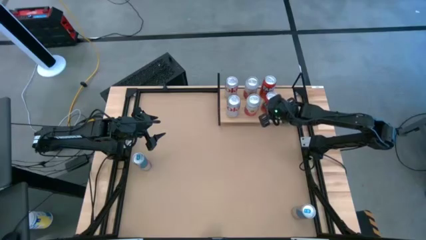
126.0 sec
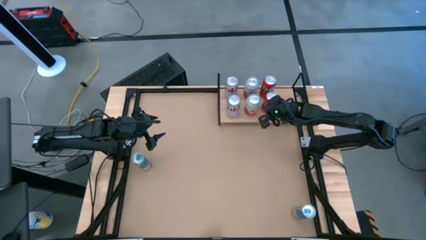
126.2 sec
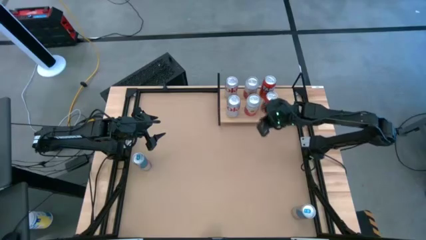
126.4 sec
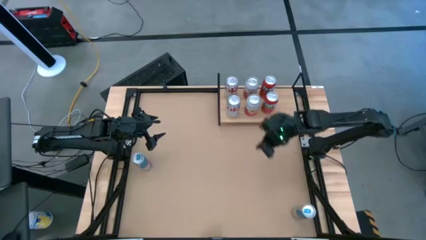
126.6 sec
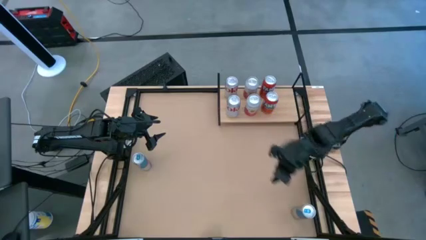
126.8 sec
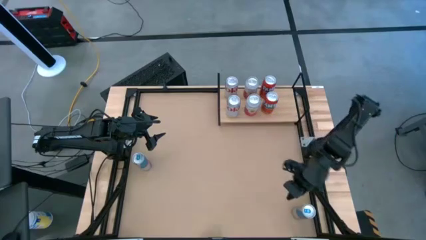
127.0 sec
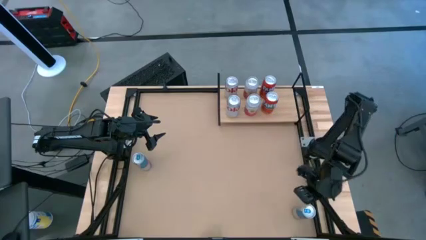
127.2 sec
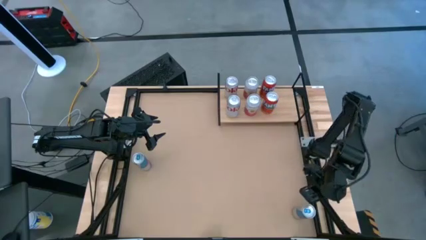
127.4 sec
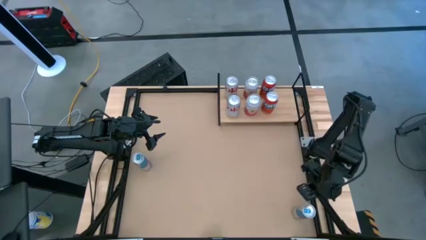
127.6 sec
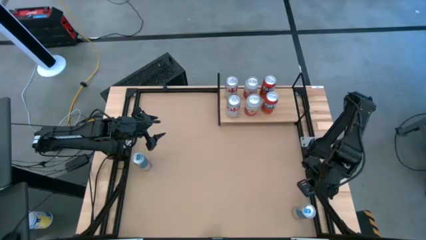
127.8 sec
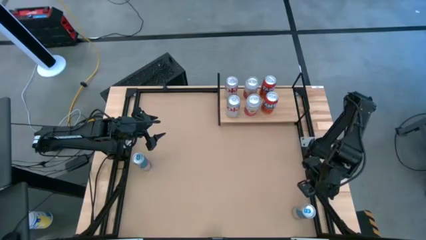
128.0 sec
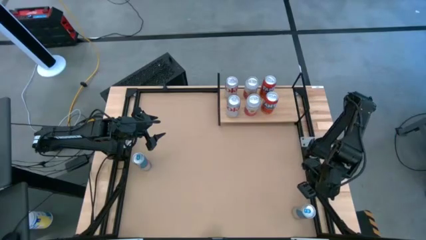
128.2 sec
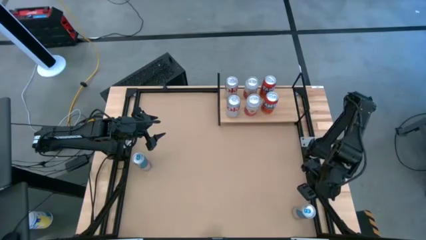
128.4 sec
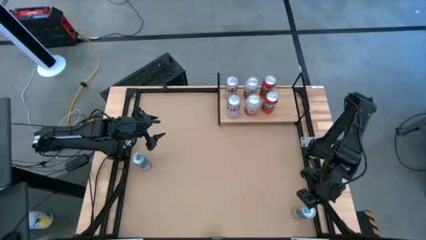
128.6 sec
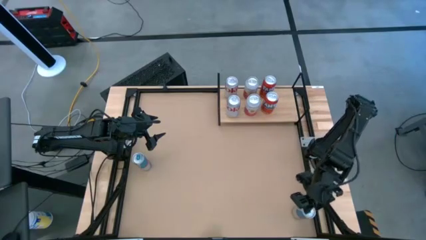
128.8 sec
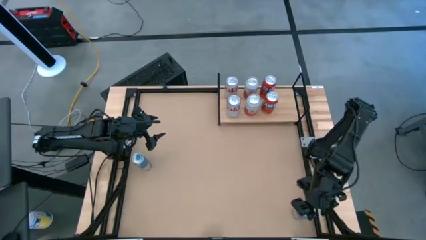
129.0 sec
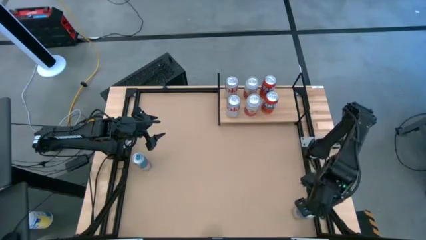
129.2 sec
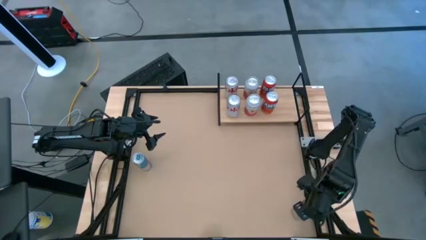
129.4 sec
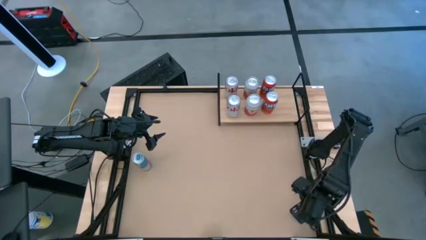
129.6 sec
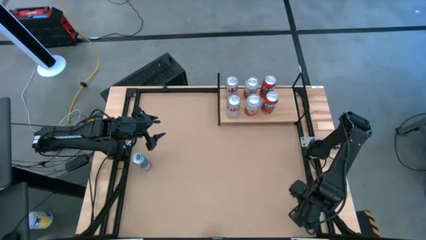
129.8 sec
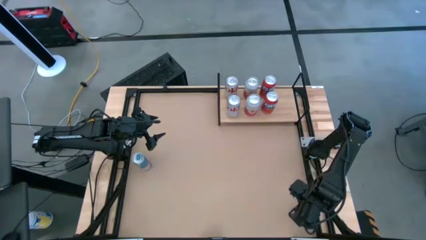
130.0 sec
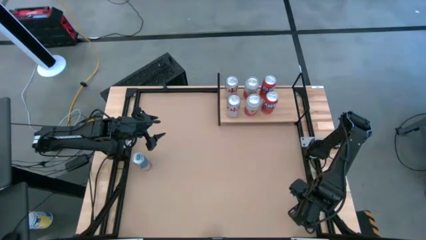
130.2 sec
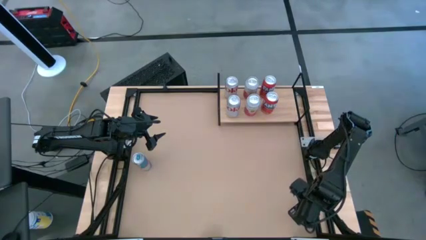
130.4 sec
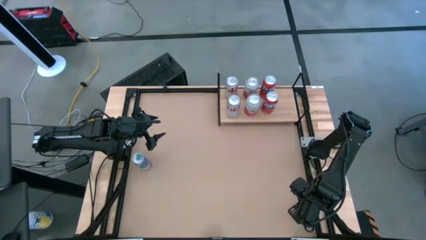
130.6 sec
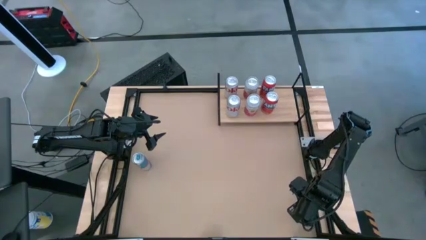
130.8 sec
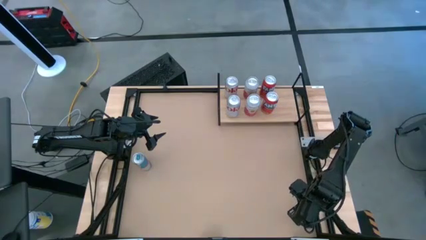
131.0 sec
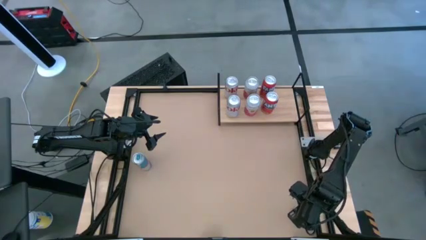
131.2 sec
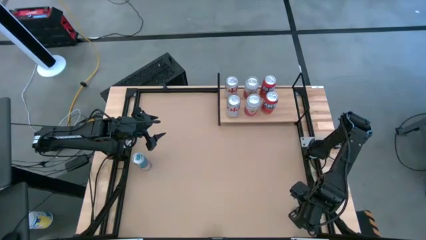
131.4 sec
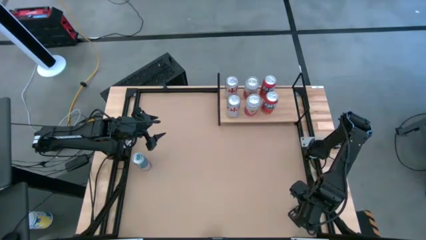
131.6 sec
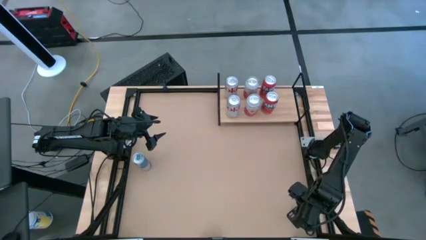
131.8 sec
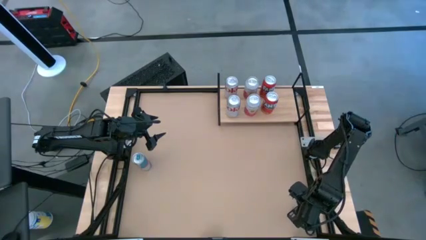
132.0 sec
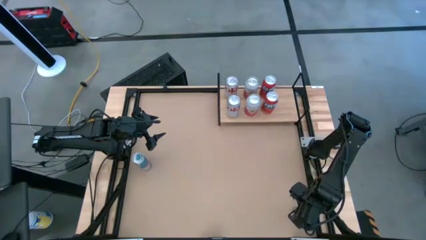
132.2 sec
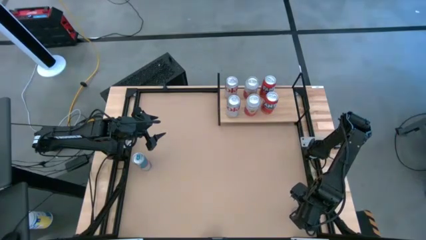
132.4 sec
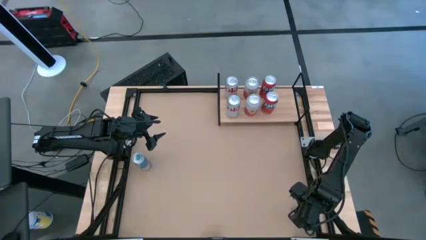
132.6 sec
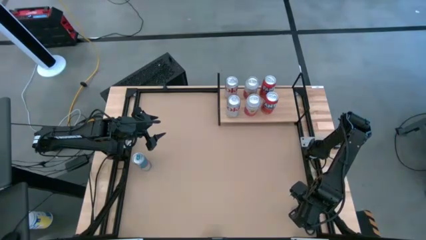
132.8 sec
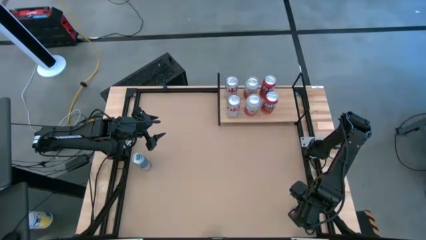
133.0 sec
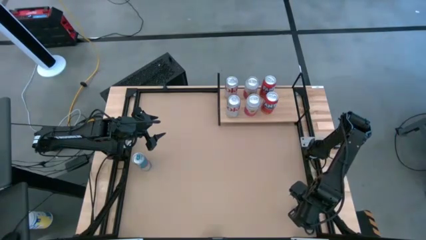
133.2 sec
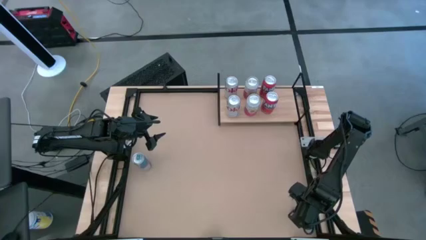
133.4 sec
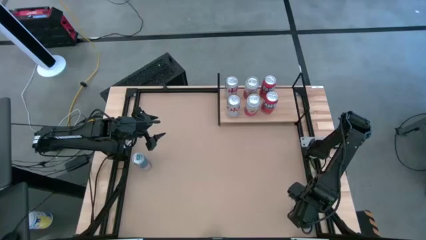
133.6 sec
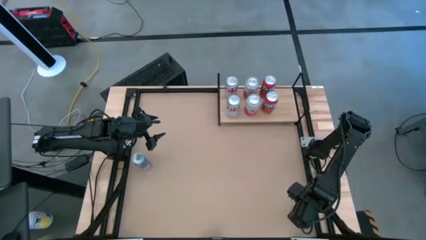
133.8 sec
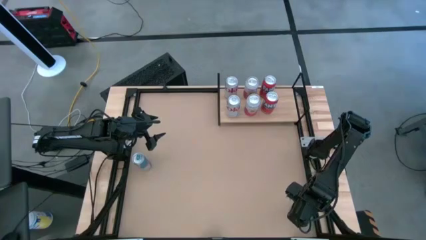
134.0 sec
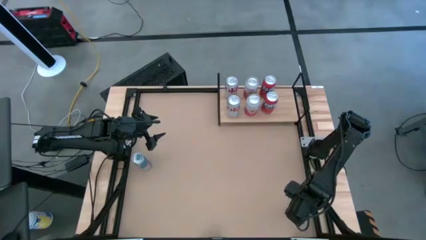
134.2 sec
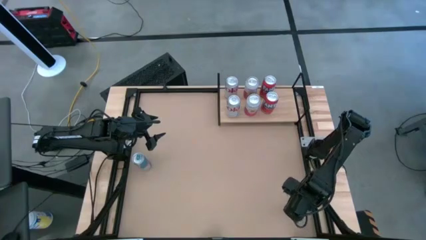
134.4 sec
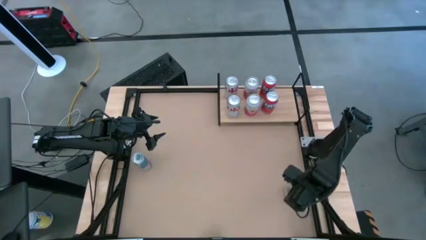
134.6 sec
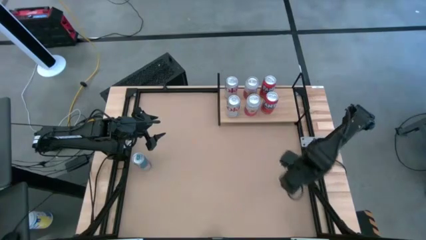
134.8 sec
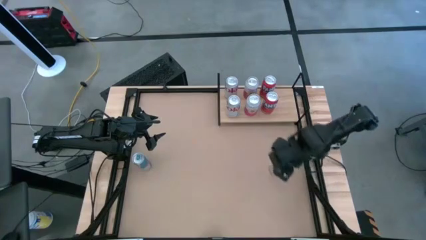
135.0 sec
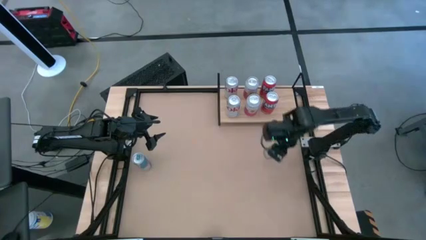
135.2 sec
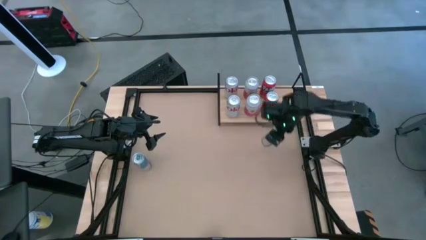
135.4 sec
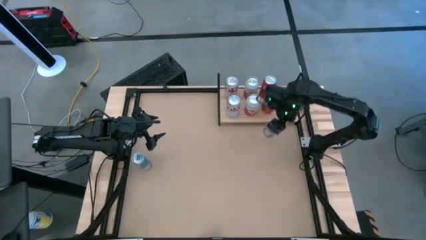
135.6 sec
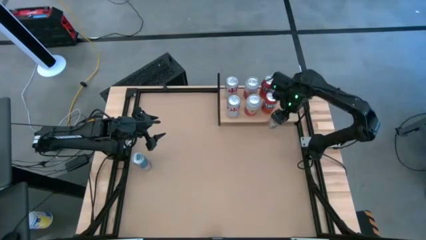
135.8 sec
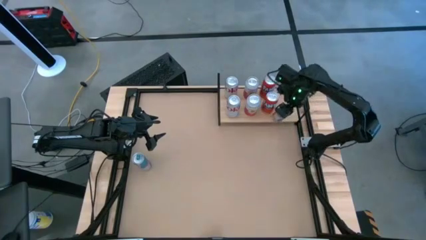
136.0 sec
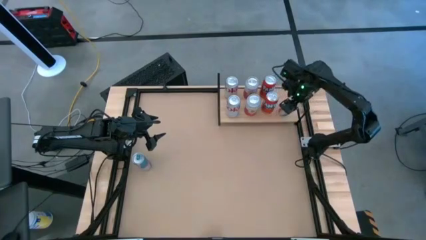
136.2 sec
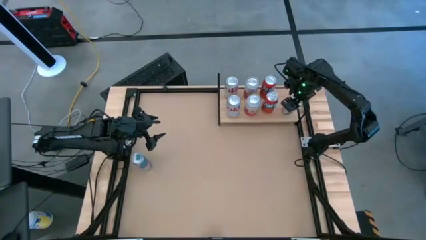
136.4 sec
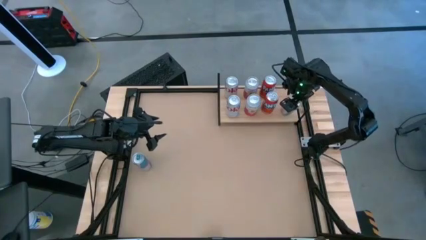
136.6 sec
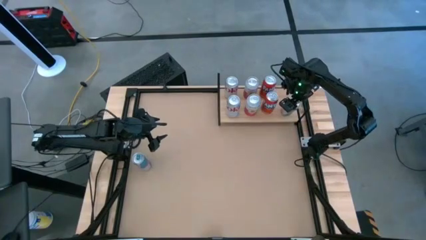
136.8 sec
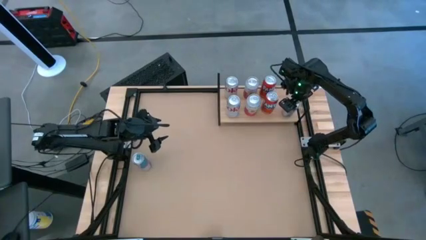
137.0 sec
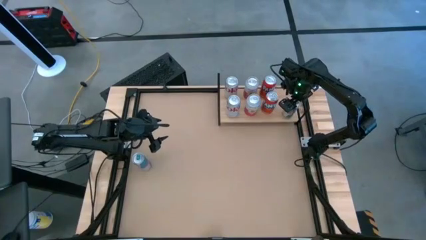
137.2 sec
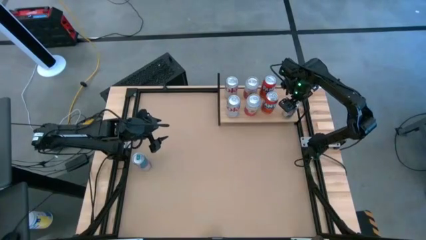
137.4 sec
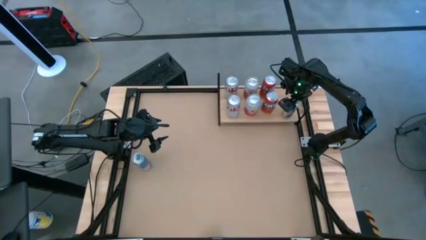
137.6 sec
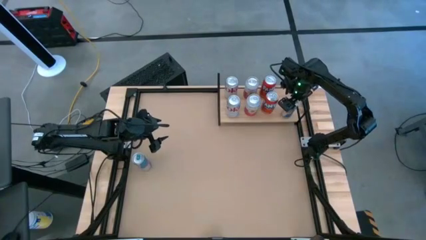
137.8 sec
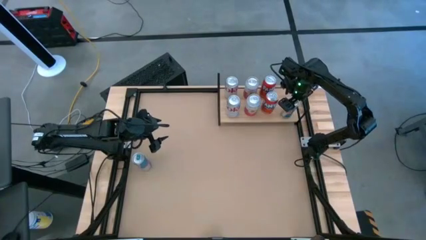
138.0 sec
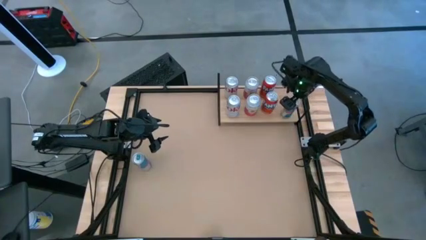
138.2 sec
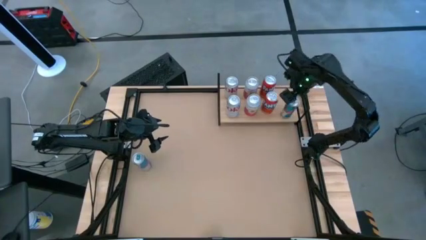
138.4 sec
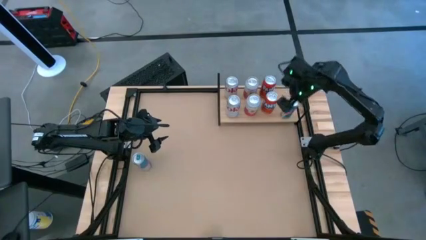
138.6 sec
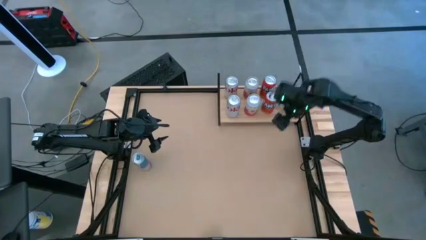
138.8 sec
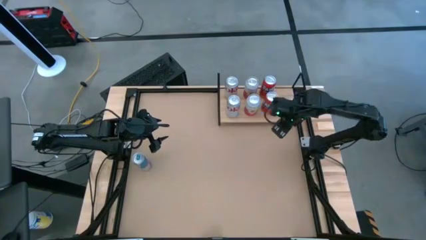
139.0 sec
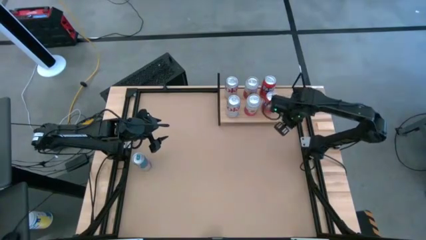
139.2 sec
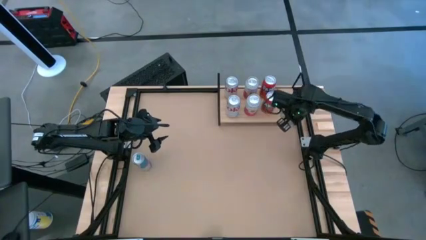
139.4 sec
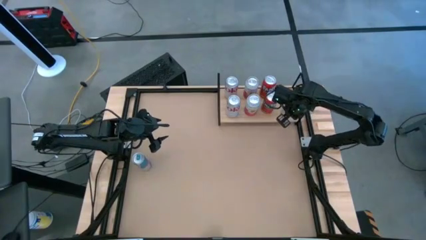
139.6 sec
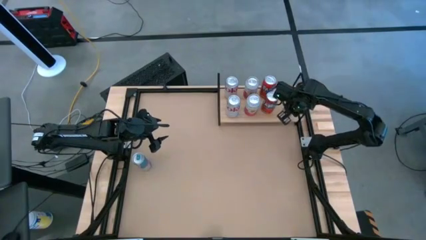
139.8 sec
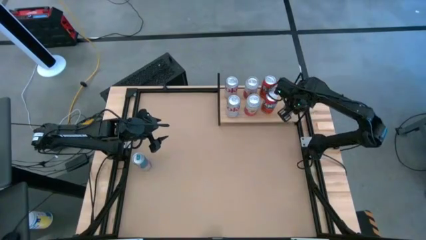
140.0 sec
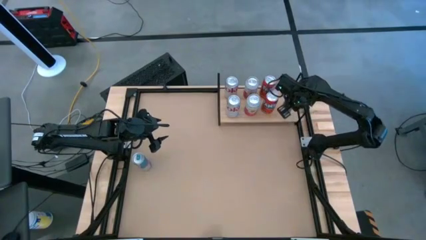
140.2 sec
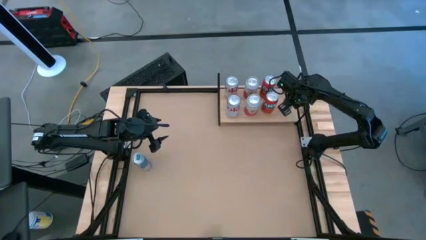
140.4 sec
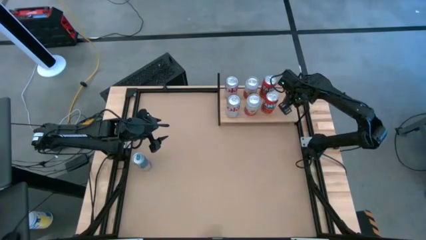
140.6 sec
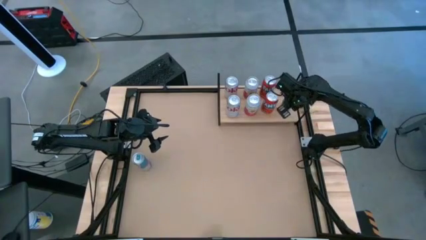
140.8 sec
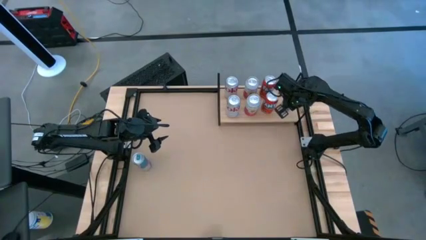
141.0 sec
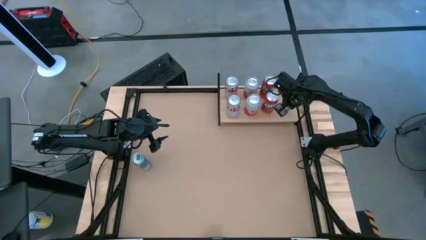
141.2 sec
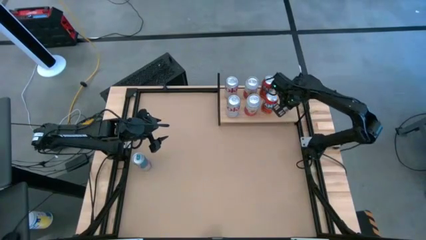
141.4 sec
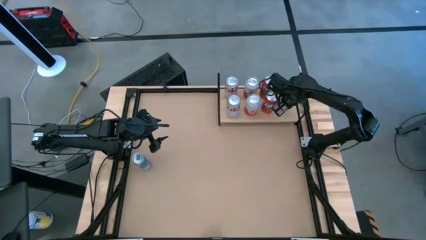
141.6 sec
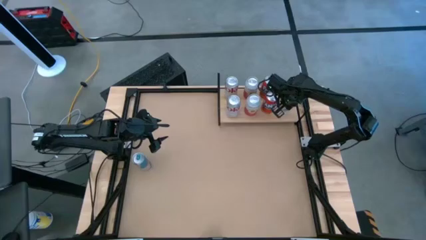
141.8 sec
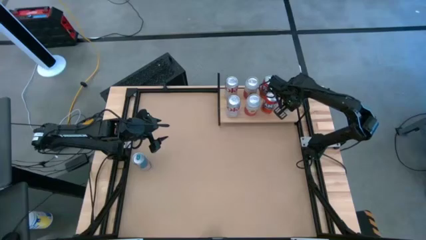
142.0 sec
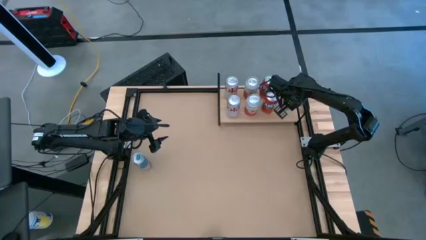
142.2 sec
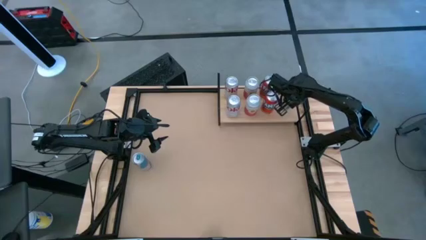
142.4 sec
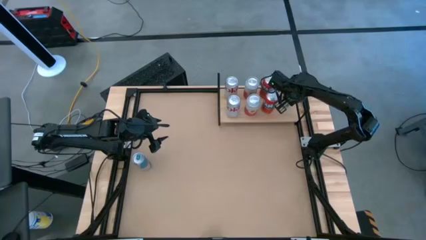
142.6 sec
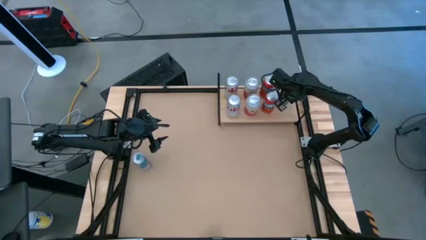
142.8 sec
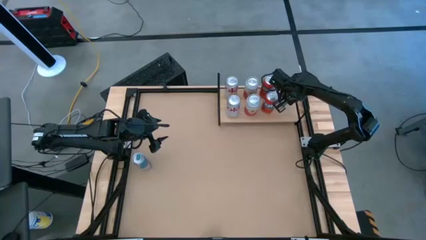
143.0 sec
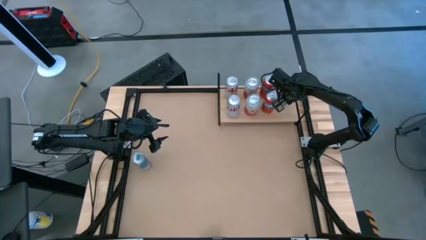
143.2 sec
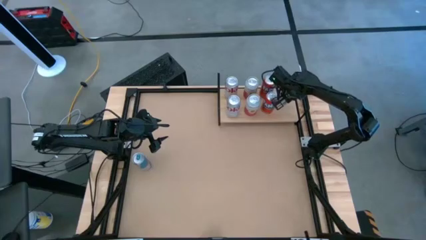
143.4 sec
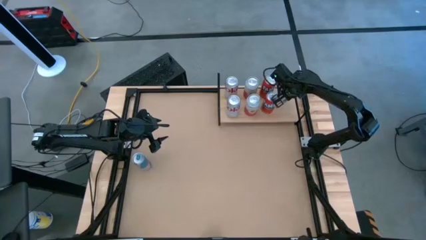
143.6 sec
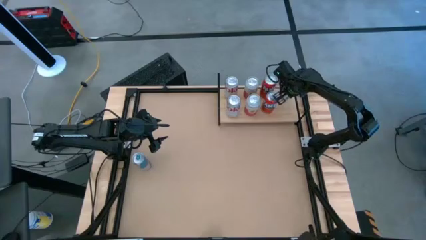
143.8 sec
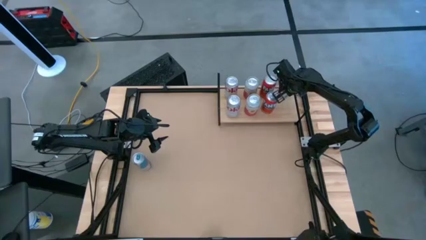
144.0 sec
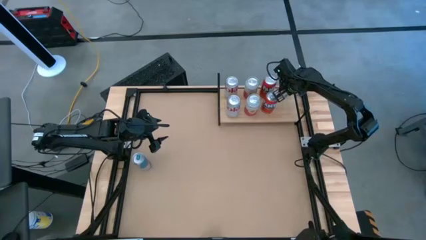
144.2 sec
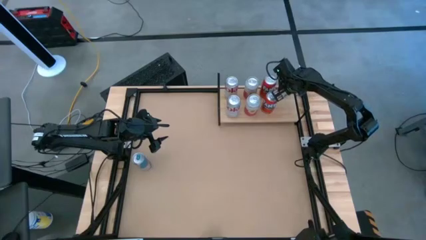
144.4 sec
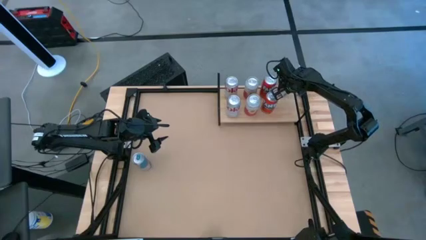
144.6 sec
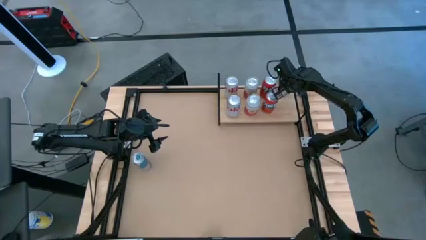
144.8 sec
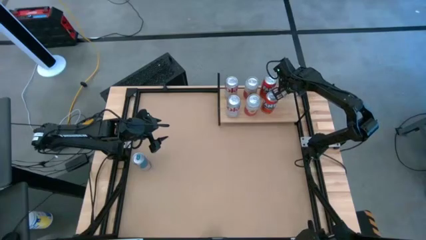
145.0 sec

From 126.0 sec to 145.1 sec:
Task: Place canned beverage on shelf
Put the bottom blue soda can on the shelf
